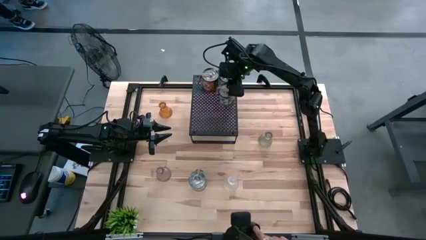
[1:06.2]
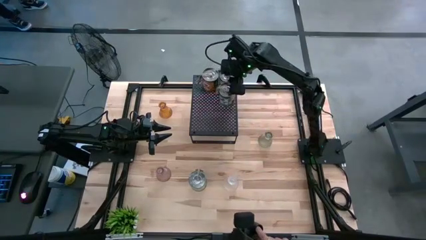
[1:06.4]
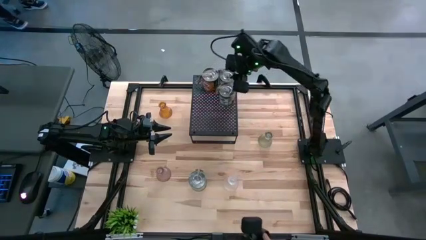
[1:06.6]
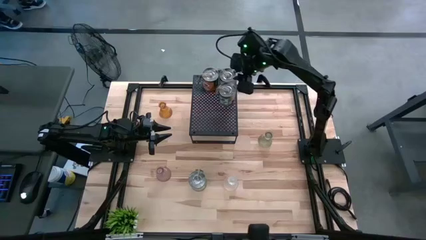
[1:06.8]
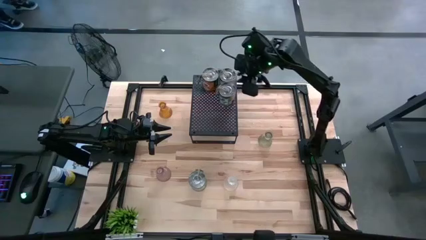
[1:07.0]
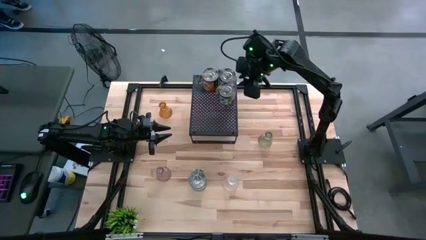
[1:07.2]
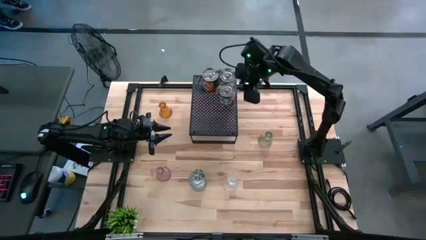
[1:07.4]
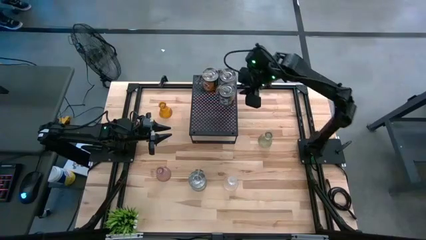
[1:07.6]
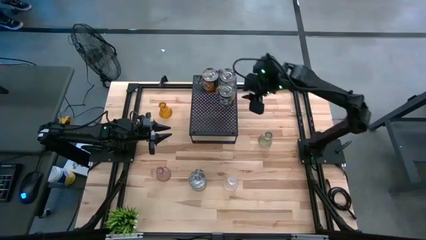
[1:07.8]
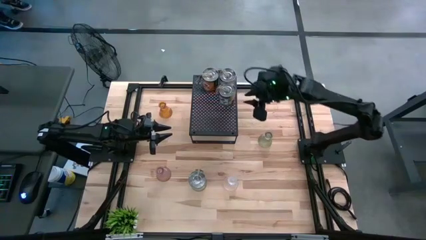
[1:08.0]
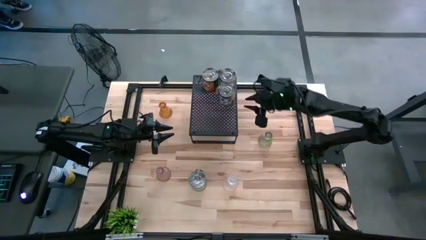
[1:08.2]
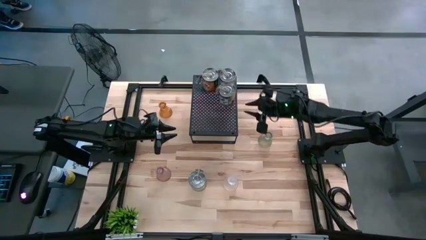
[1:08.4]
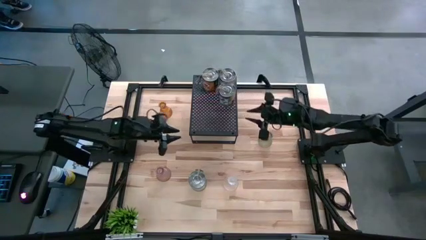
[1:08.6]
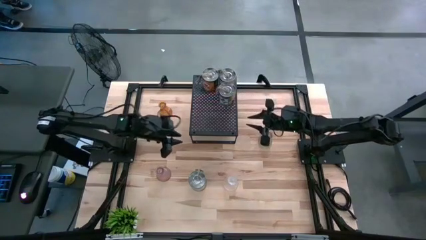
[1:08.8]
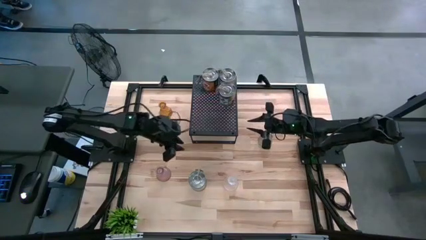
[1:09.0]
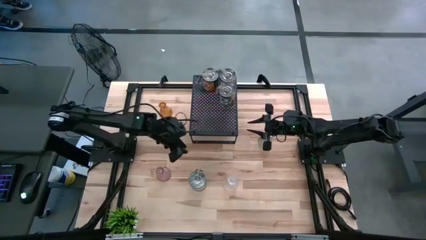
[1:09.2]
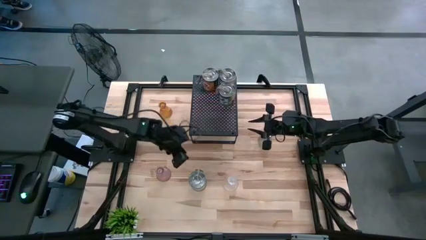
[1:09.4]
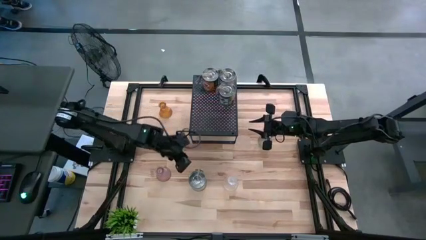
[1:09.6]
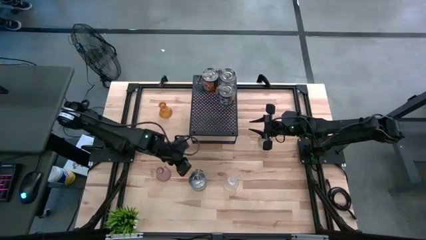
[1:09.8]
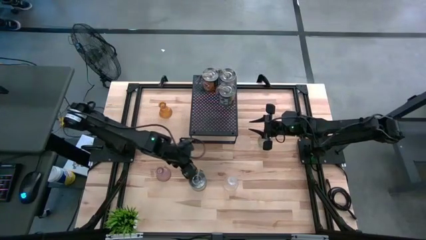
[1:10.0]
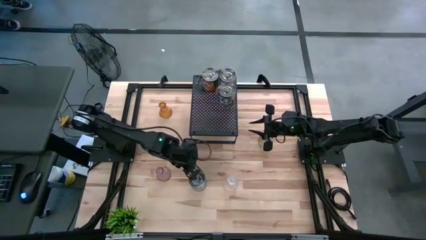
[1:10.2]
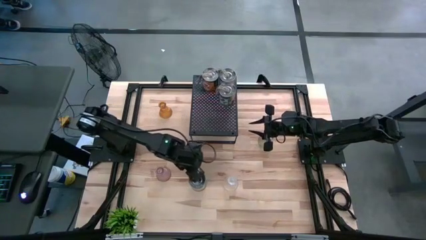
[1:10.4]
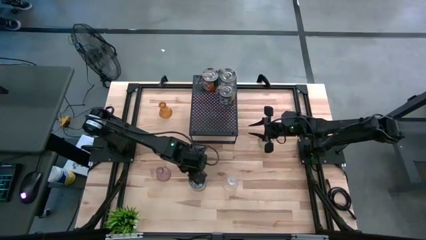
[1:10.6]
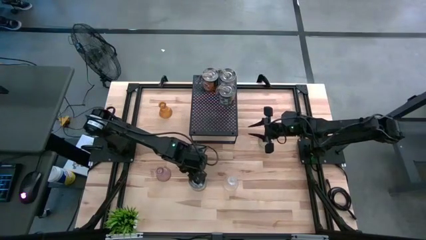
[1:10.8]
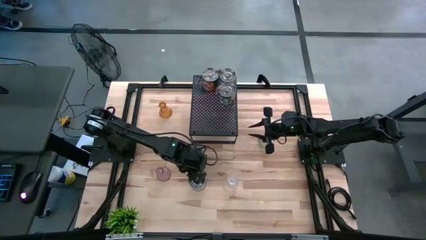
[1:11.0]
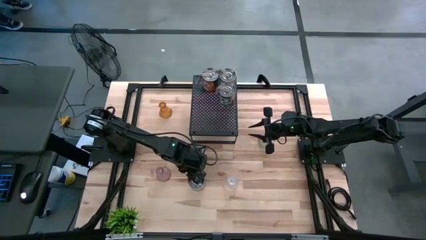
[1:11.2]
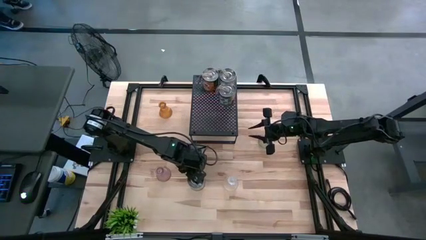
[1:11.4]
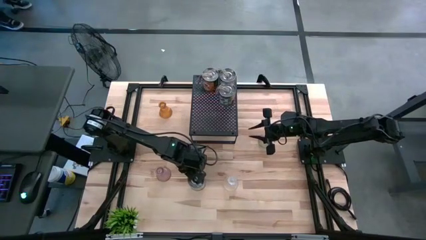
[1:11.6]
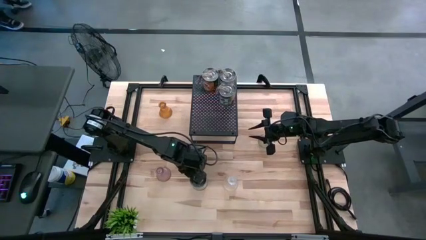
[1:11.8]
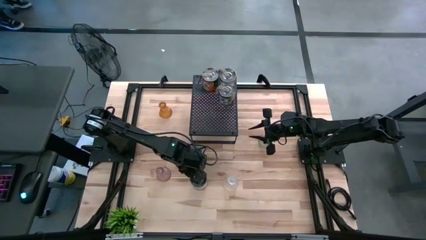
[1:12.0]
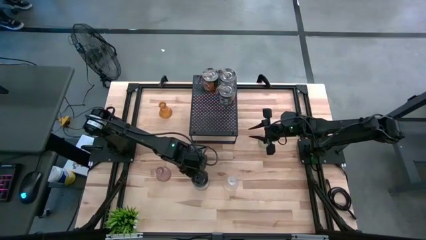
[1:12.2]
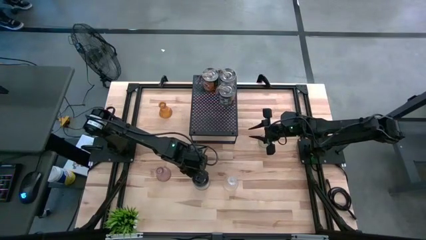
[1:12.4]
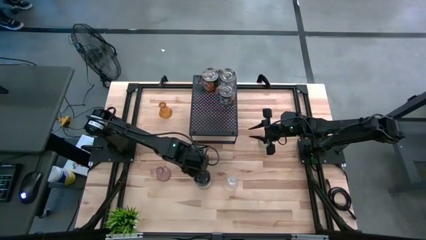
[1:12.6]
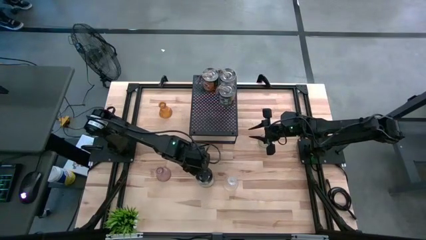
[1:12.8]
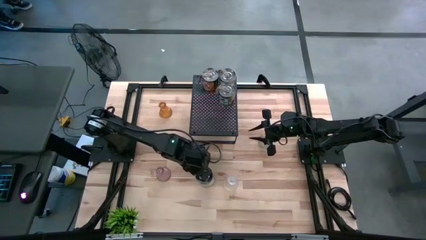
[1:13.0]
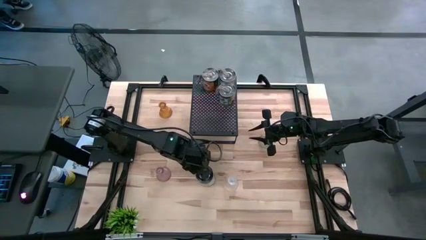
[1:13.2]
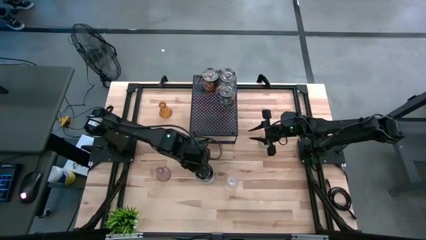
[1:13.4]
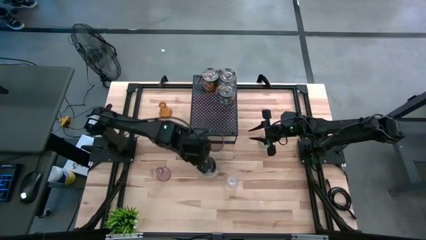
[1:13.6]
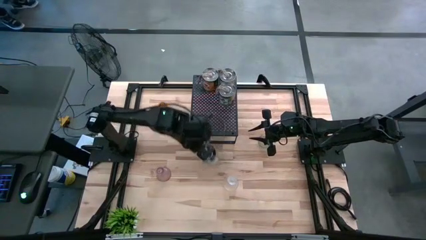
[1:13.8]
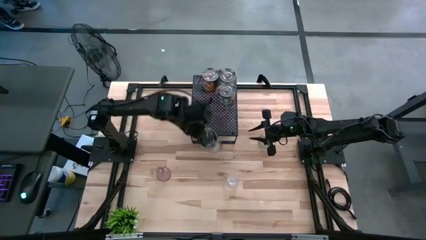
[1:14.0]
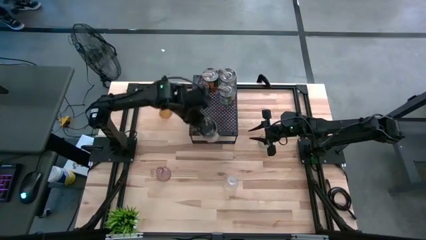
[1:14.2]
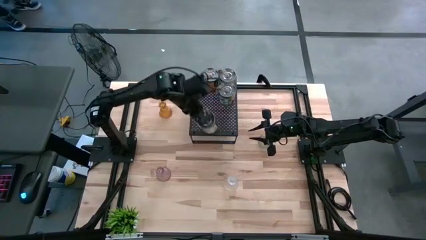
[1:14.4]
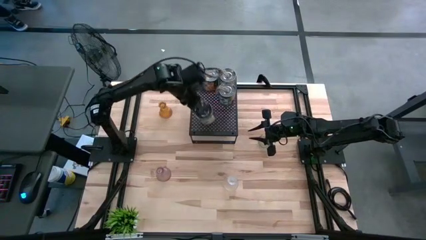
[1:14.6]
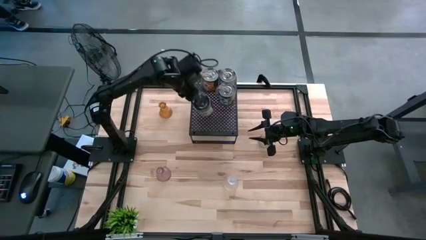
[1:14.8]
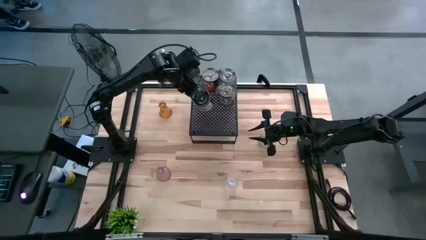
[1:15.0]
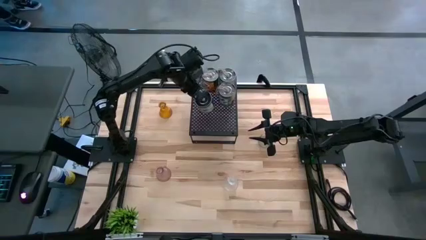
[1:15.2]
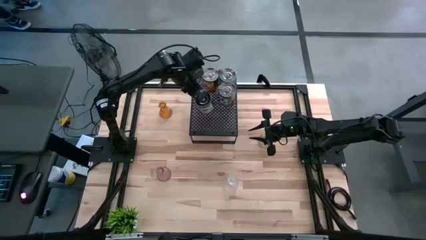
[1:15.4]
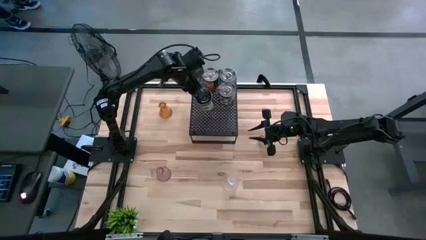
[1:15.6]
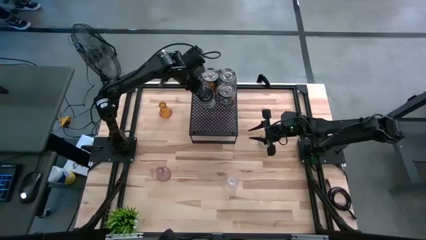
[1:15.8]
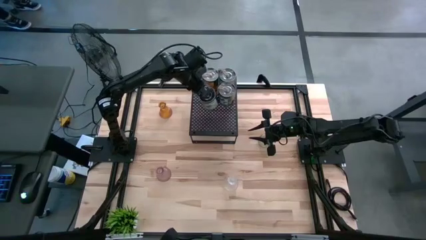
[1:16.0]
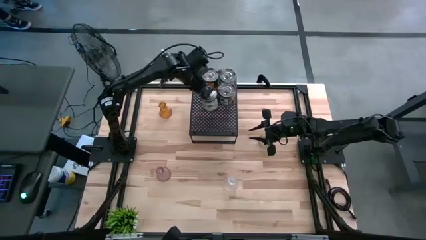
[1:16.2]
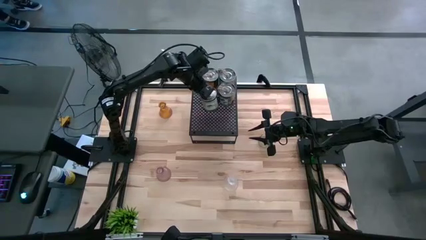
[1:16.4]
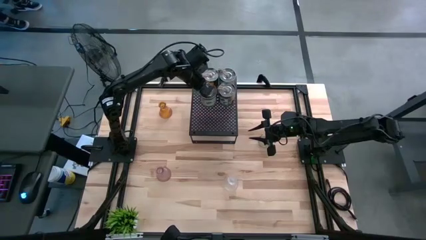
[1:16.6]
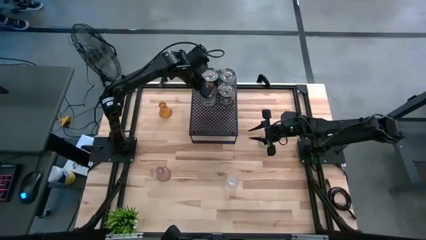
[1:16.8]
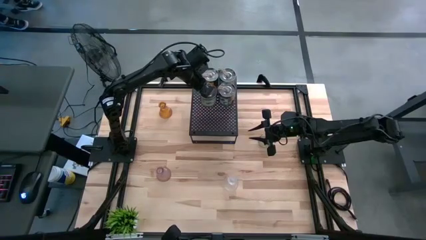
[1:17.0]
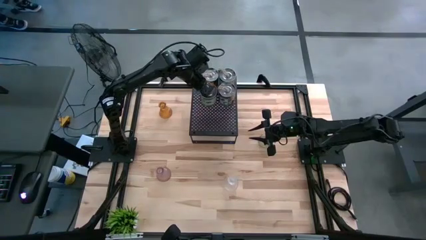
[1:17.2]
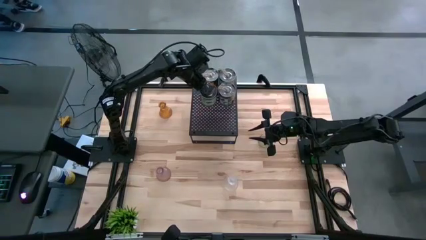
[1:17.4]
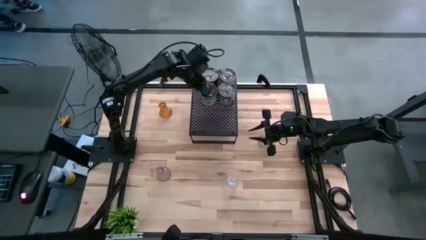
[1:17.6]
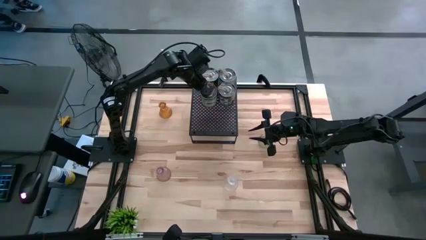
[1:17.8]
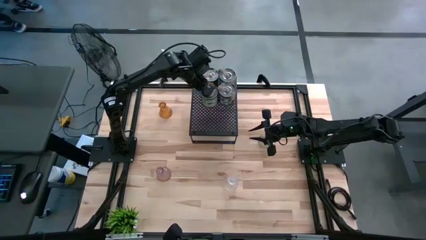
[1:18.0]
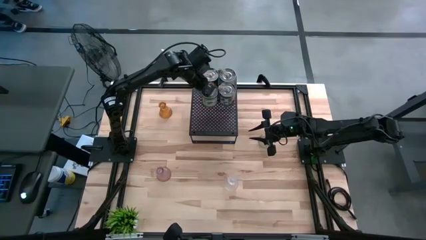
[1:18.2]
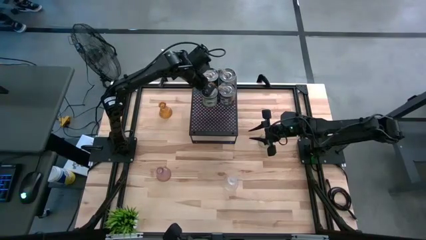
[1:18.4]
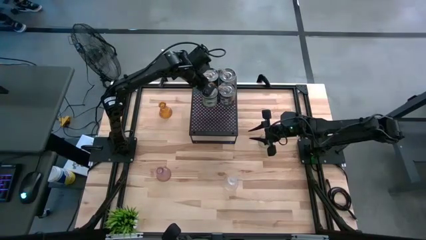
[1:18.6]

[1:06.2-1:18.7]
Task: Pick & Place candle stick holders
Align the silver scented candle with the silver scented candle on the black shelf

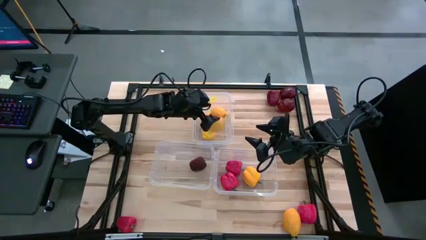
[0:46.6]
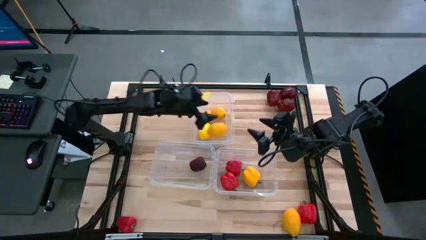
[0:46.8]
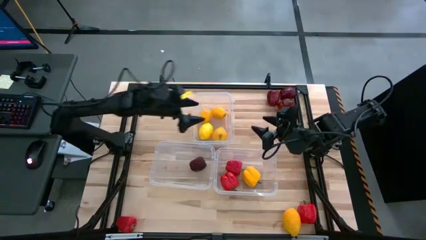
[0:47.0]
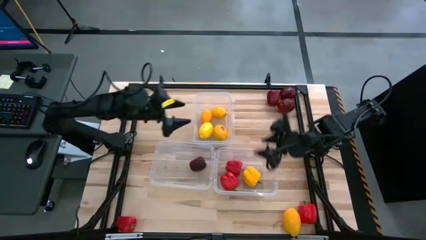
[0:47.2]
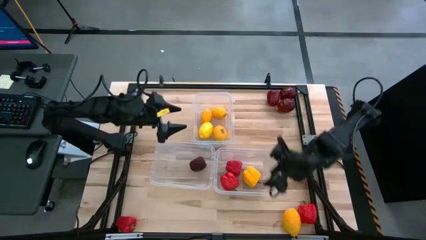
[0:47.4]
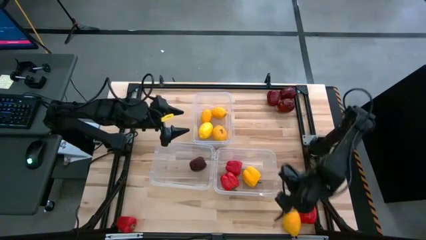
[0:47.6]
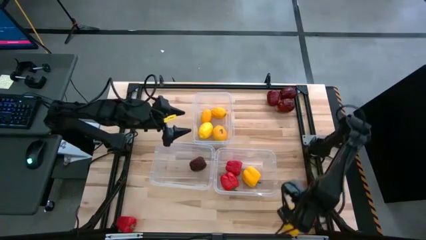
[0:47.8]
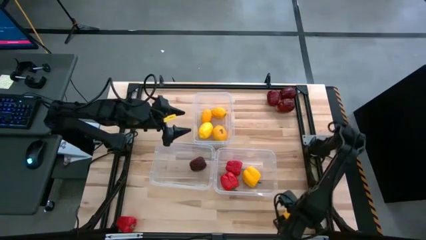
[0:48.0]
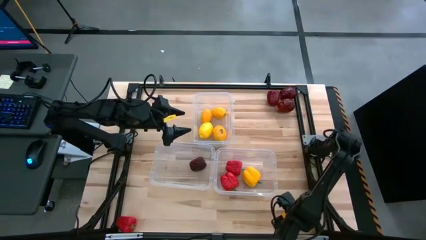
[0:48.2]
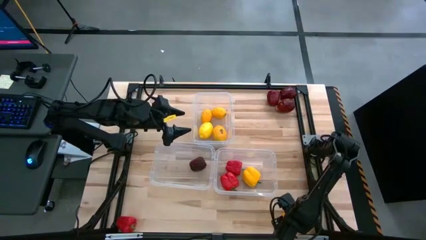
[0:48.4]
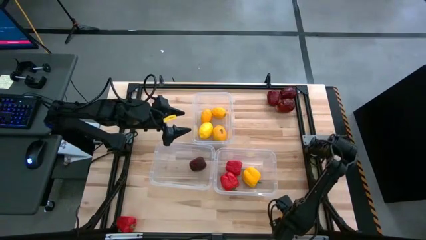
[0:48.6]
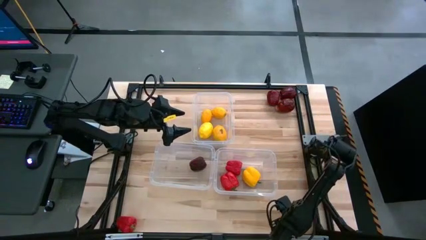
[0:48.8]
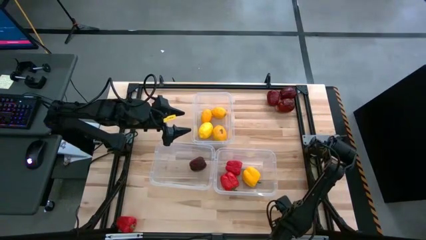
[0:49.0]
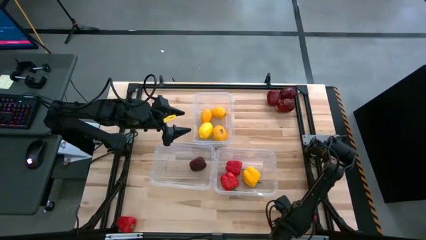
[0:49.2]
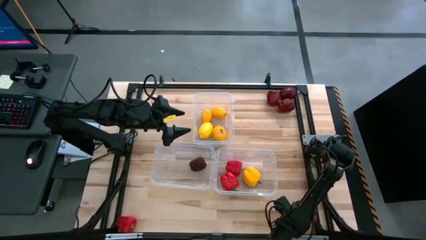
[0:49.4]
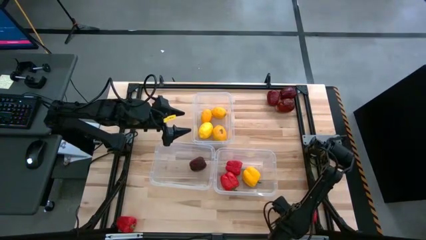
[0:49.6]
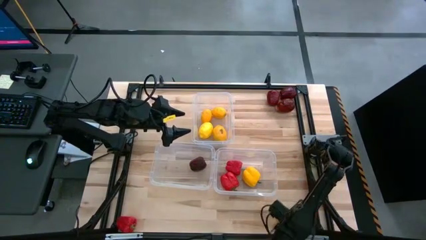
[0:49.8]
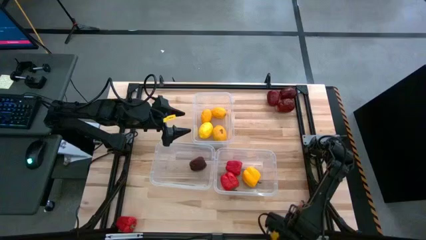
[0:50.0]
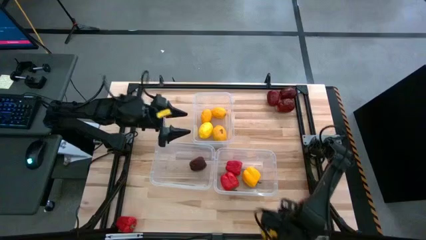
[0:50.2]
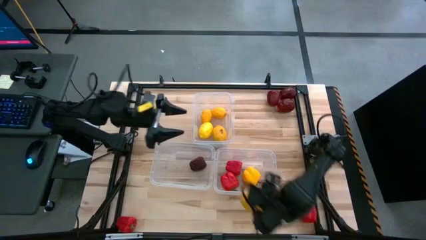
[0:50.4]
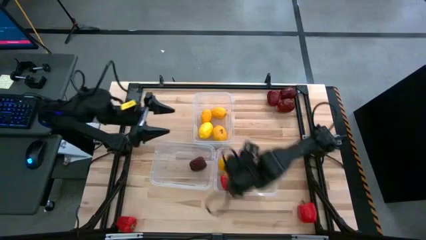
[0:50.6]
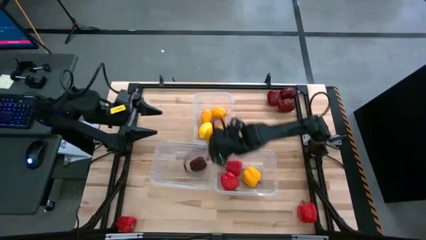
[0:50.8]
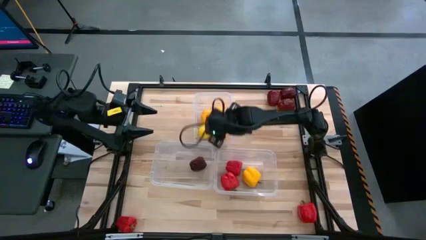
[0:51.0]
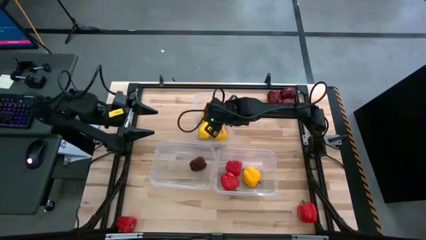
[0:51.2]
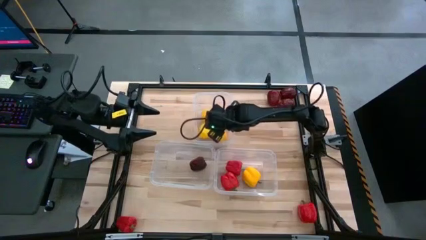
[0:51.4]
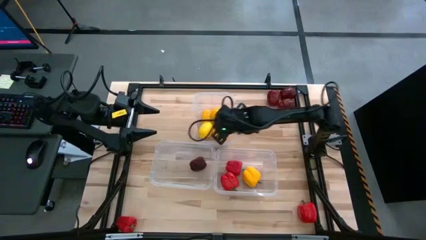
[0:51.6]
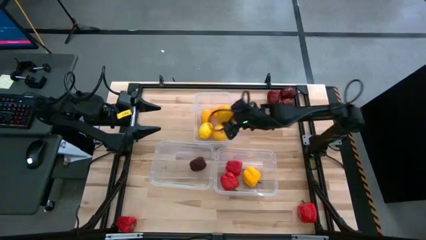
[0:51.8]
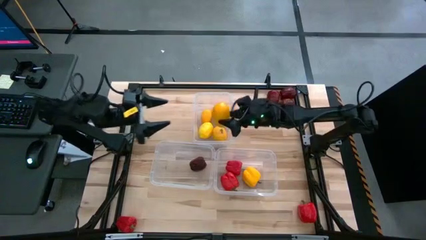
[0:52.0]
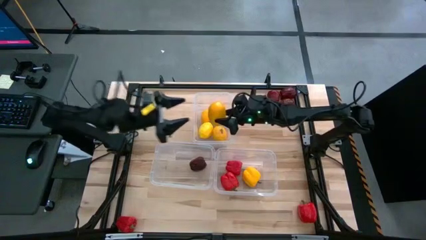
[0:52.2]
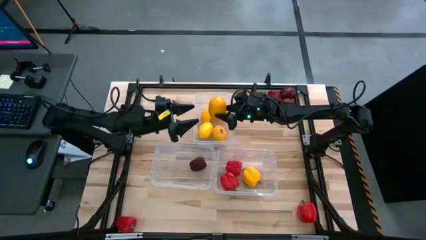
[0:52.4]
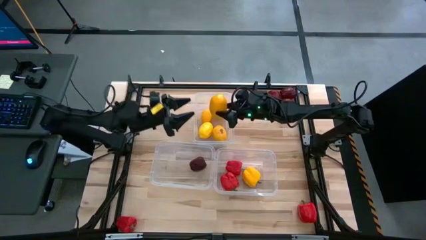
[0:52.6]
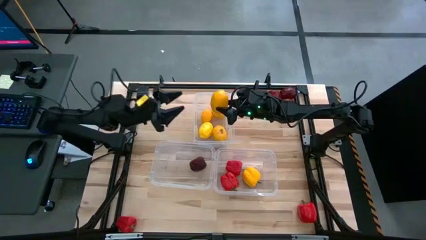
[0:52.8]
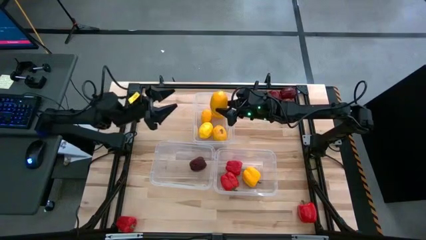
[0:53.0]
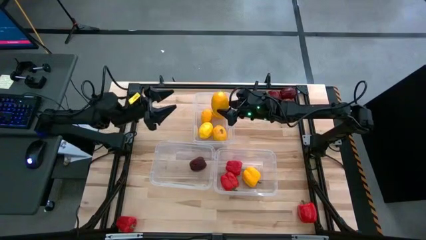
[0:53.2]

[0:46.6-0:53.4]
Task: Sort produce into baskets
Put the yellow lemon into the top center transparent bin
